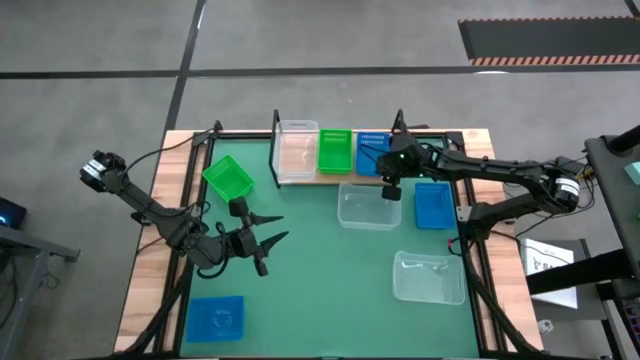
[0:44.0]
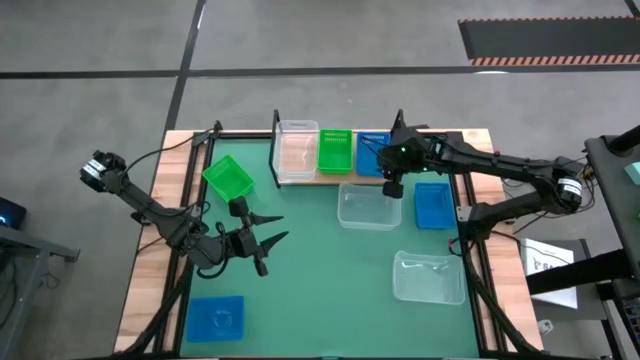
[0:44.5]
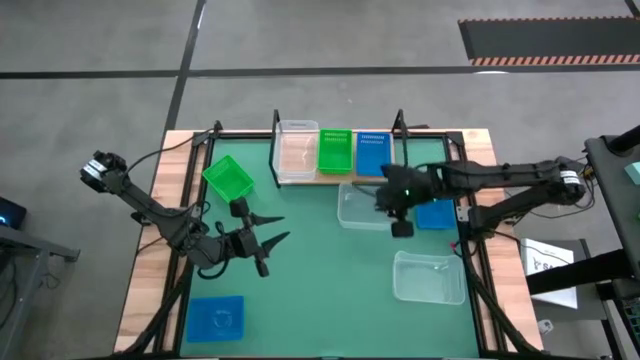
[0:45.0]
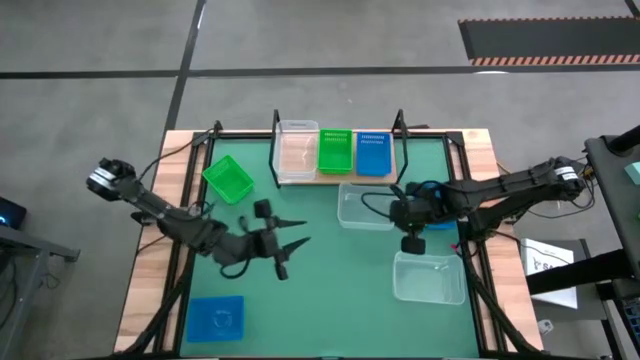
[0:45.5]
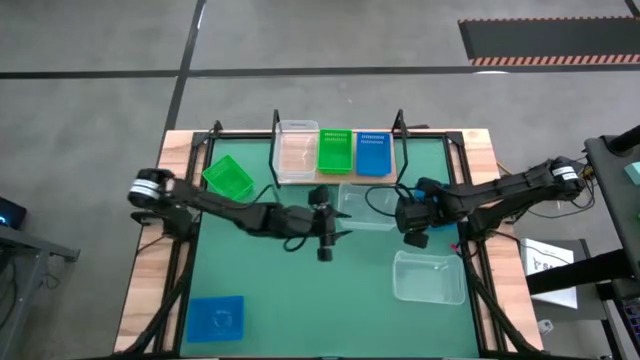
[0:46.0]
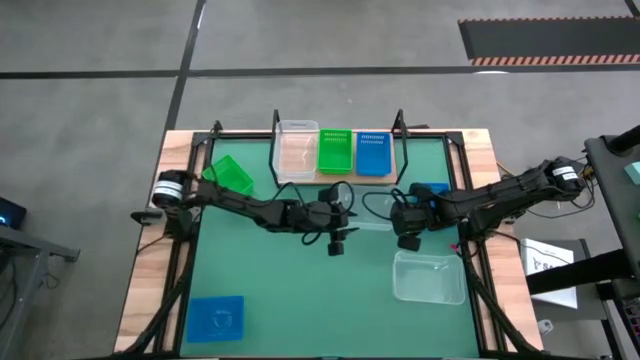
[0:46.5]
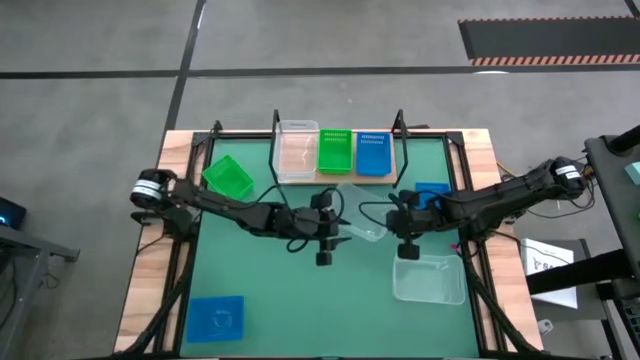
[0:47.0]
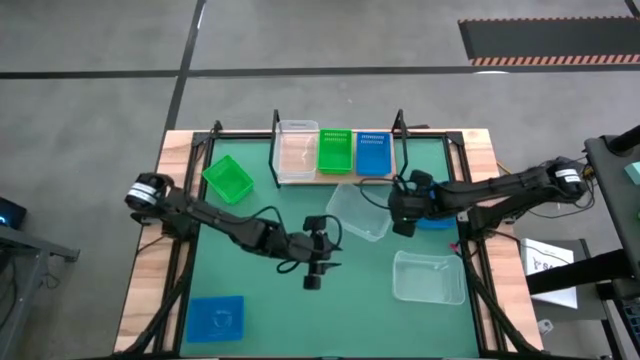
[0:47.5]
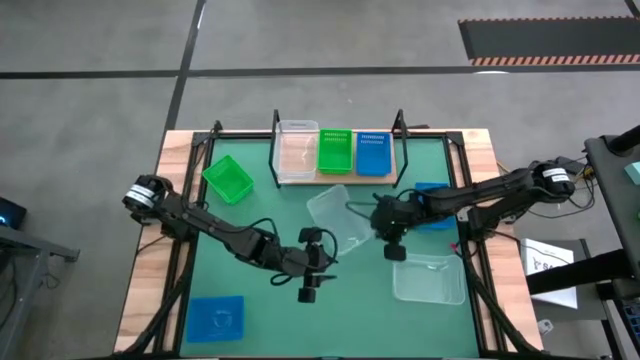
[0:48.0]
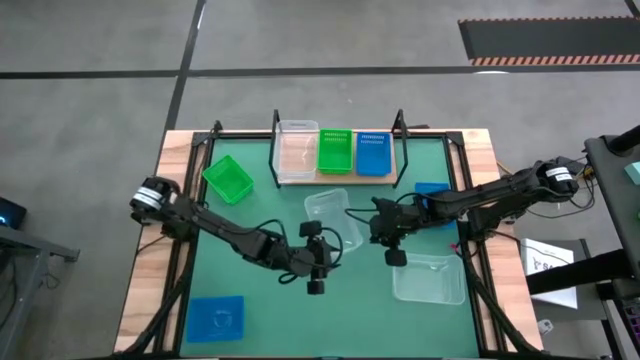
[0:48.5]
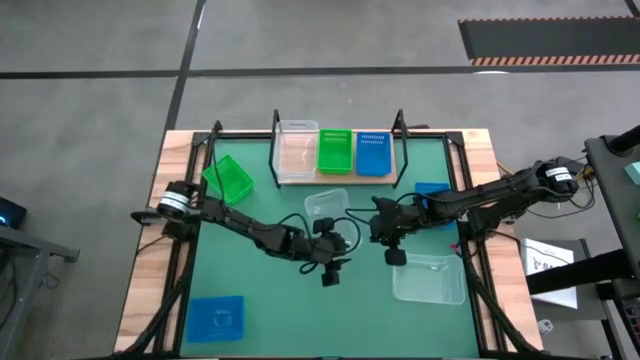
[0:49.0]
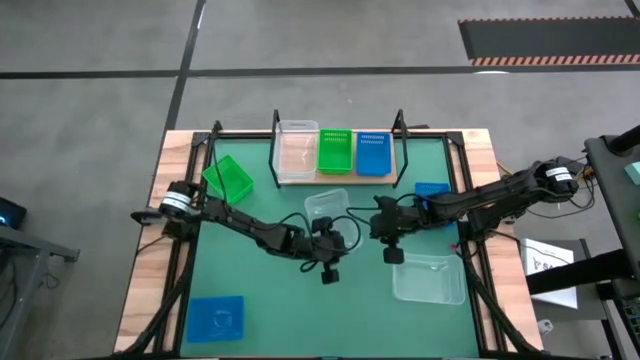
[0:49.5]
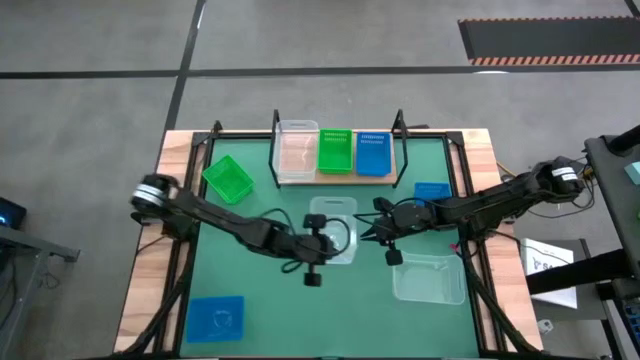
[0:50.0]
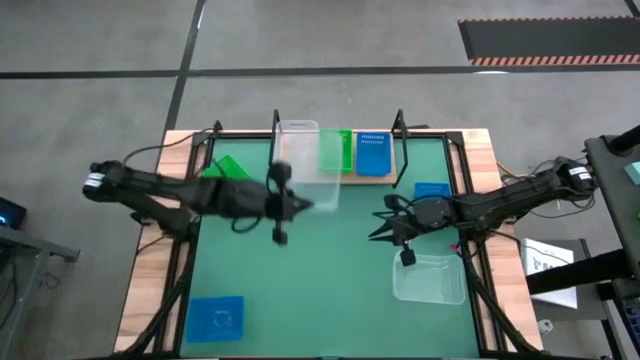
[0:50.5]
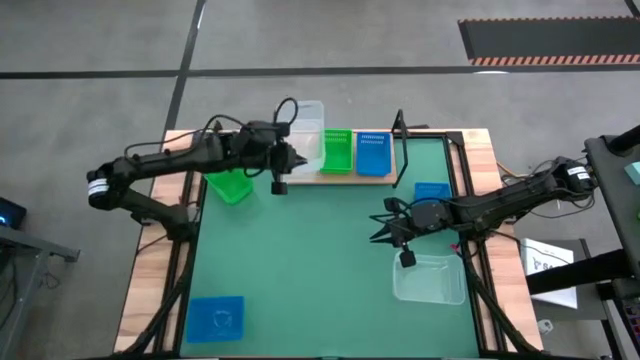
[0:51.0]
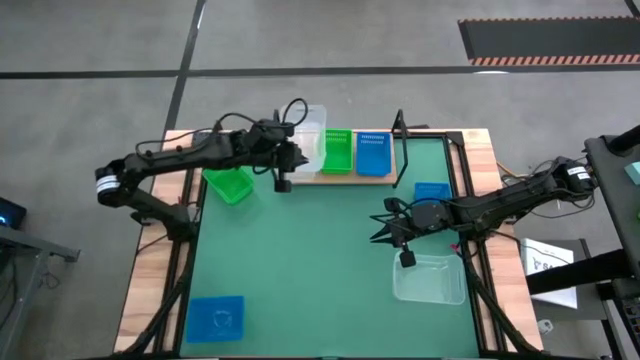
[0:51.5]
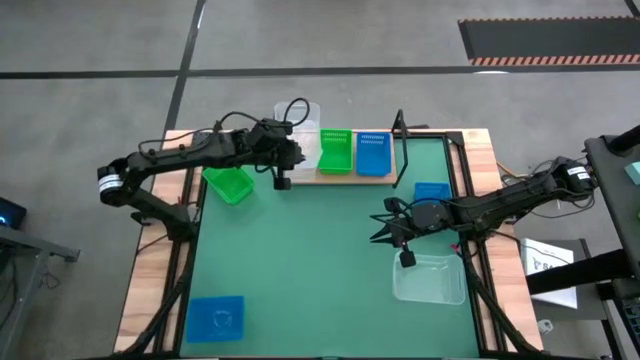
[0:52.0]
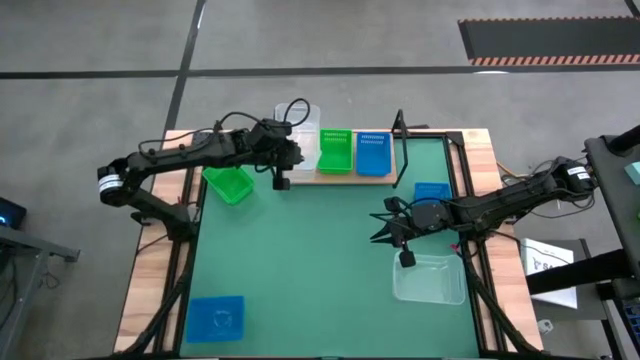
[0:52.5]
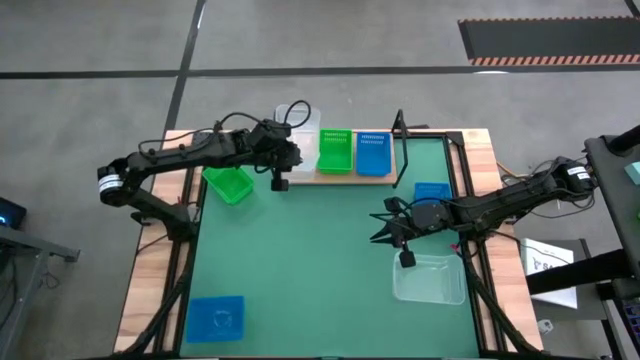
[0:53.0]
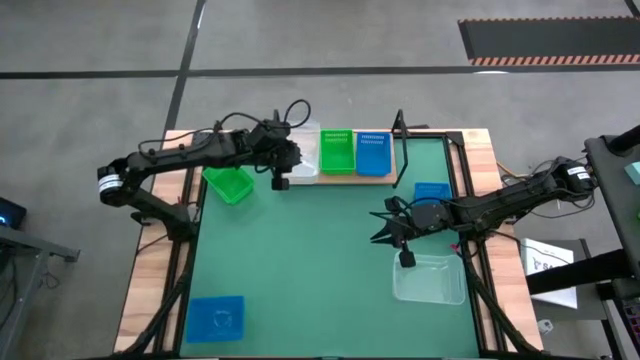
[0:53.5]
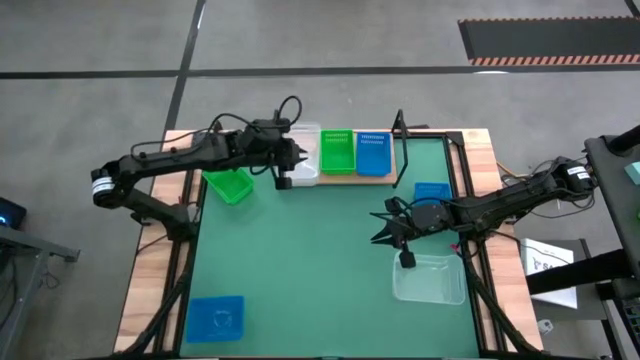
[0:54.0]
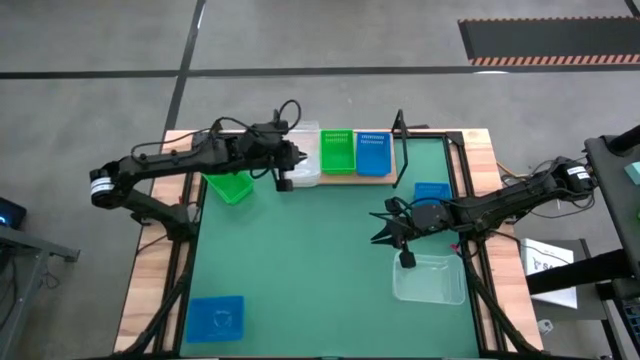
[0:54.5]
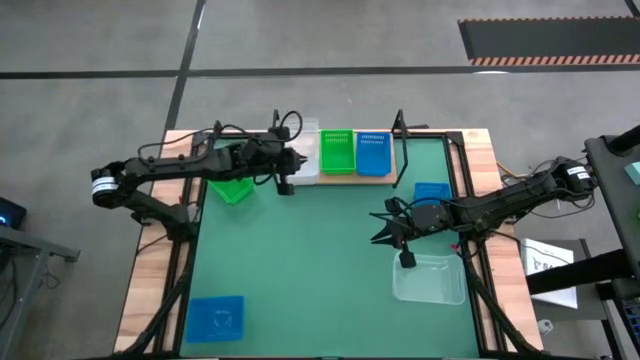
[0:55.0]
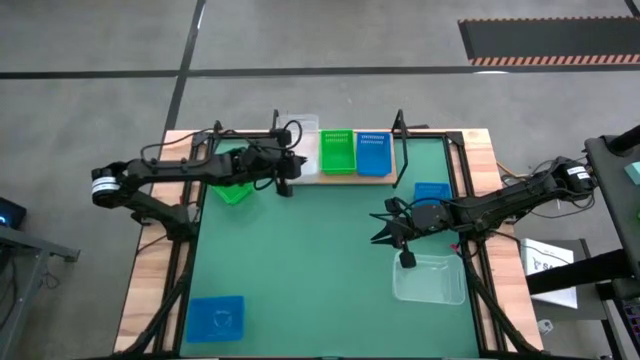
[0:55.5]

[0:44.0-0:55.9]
Task: Stack baskets on shelf by color
Stack the top transparent bin on the transparent bin on the shelf

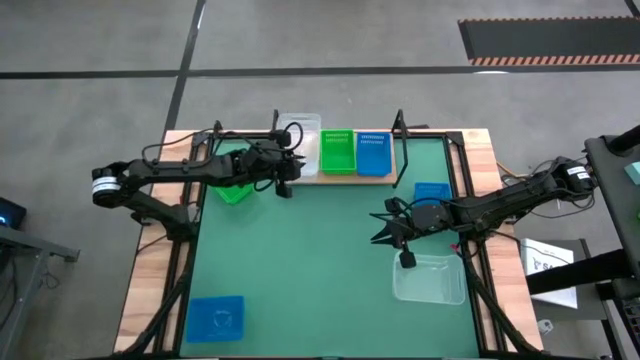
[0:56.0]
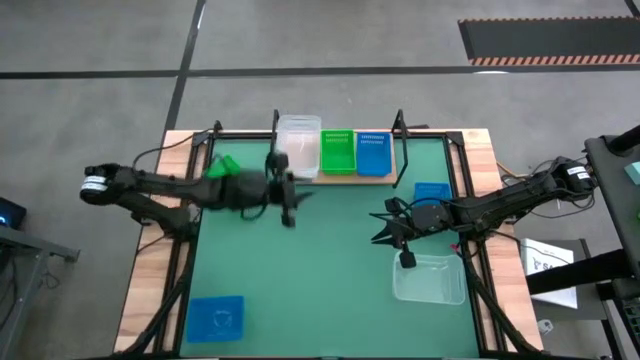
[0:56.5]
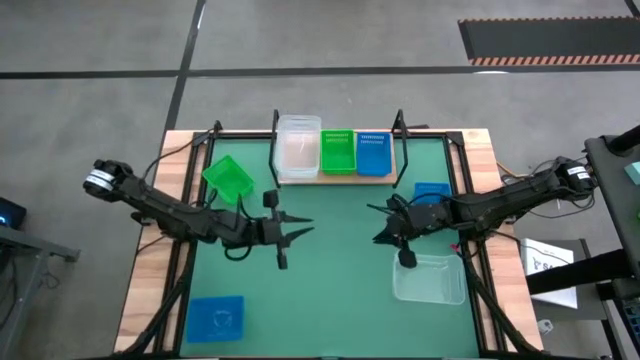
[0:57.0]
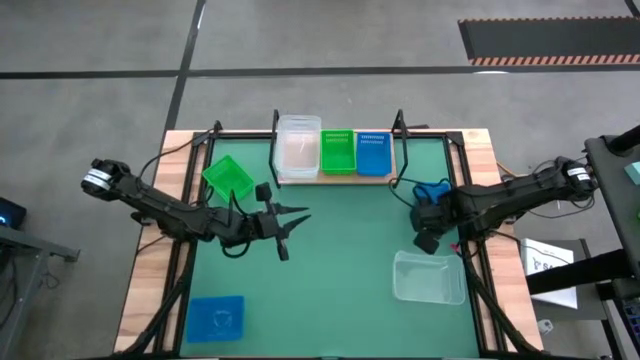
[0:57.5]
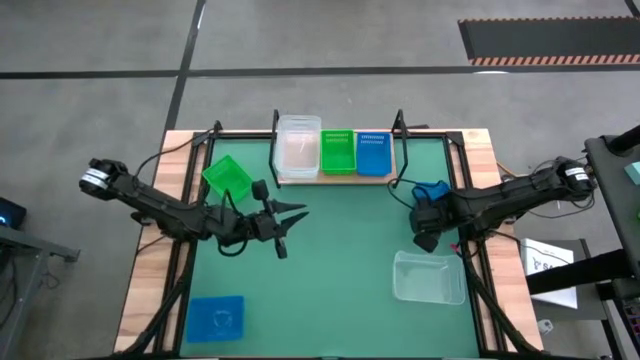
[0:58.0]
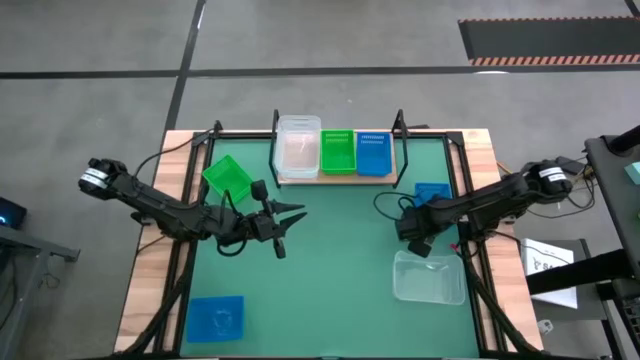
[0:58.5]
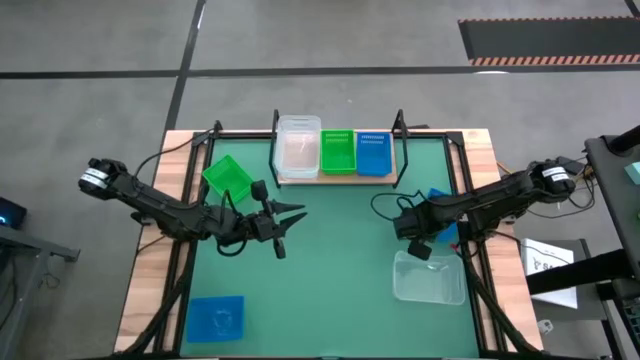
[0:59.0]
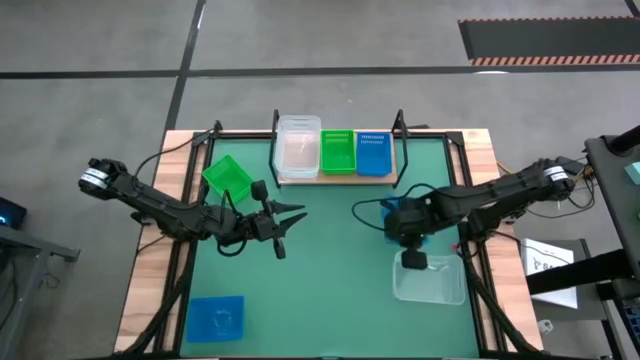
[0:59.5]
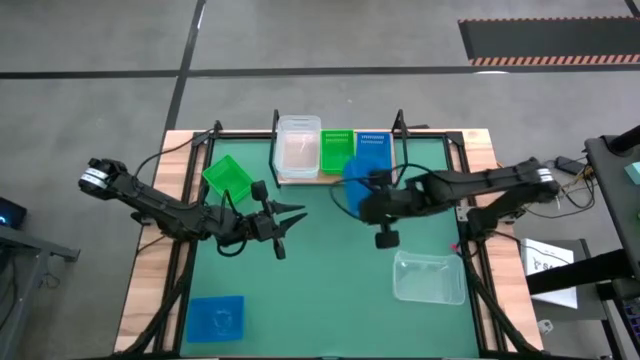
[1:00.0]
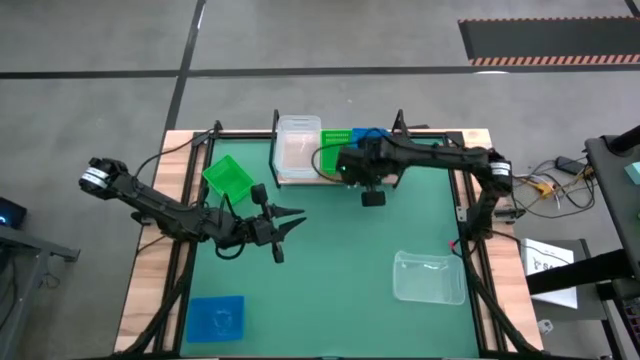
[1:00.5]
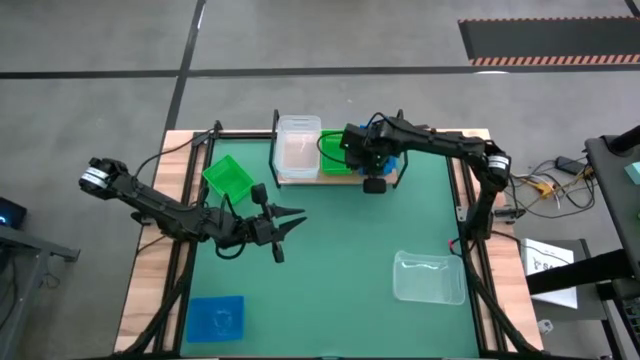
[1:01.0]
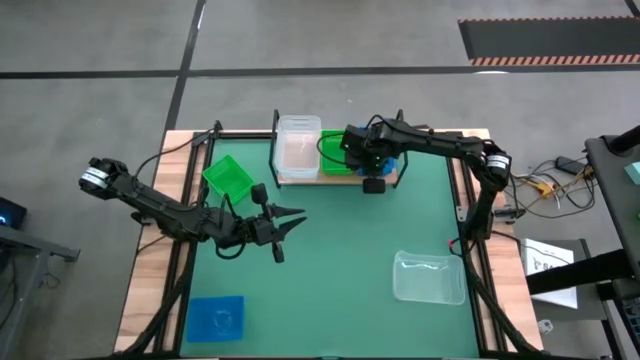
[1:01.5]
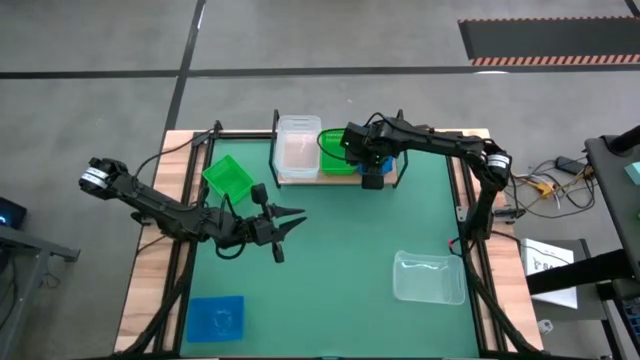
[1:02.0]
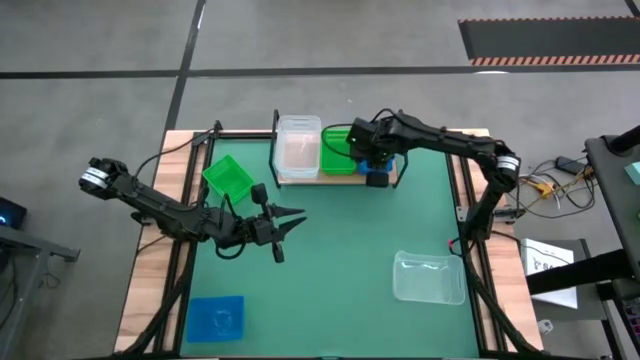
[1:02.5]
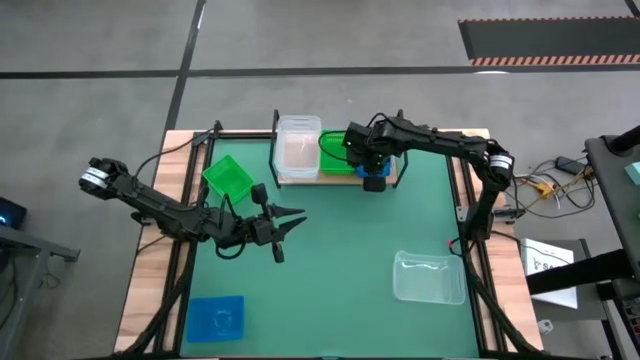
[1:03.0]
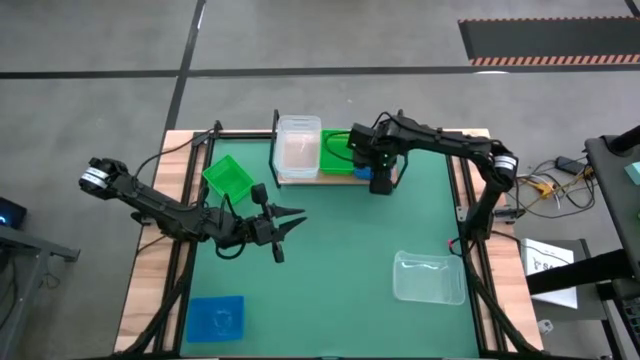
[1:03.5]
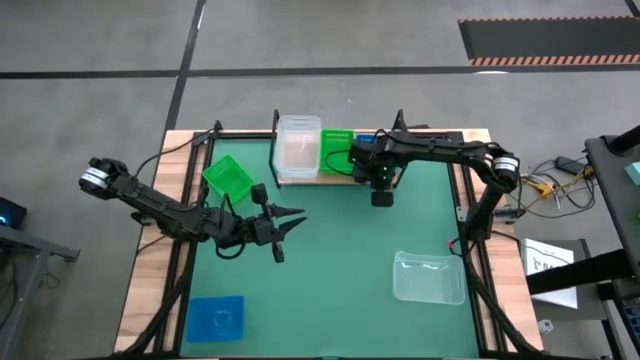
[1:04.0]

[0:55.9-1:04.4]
Stack the top blue bin on the blue bin on the shelf
